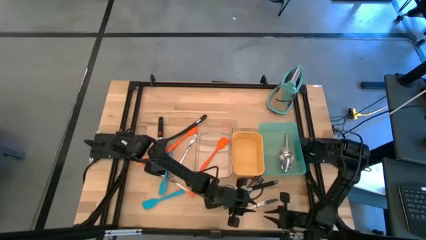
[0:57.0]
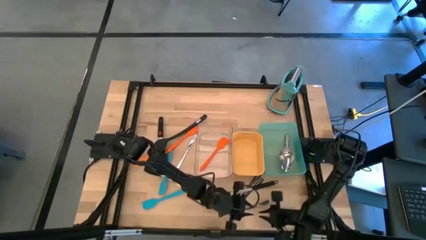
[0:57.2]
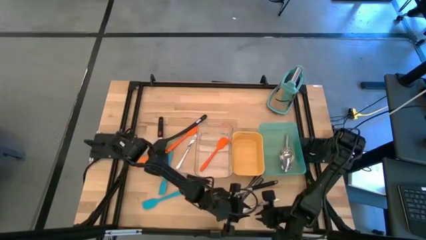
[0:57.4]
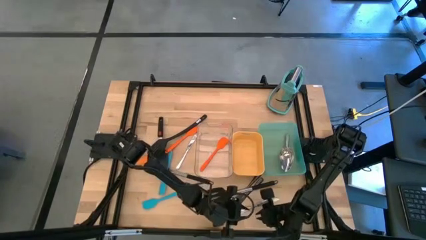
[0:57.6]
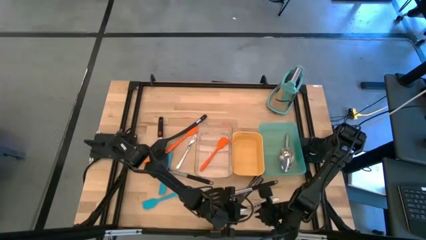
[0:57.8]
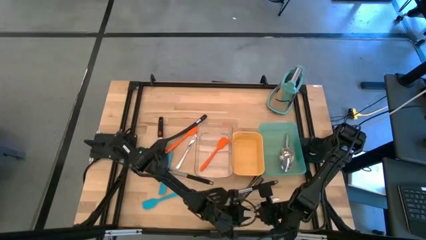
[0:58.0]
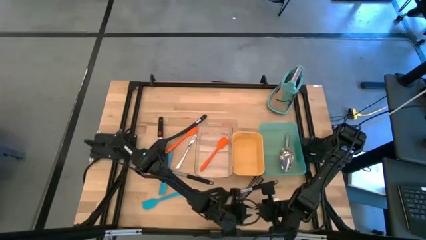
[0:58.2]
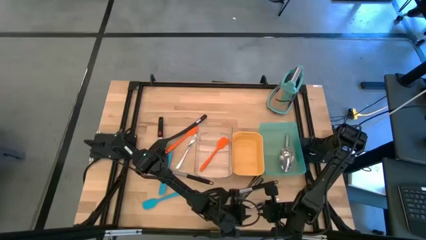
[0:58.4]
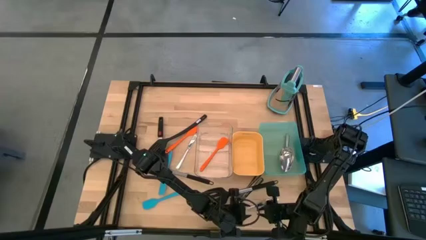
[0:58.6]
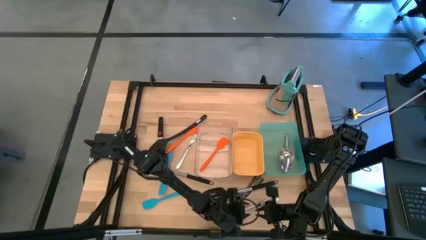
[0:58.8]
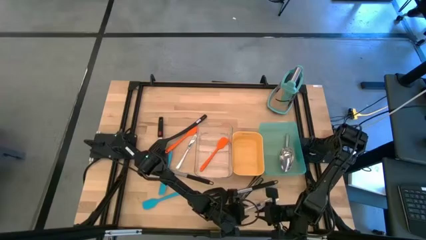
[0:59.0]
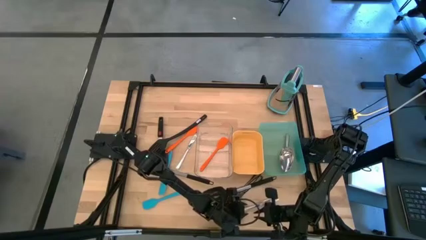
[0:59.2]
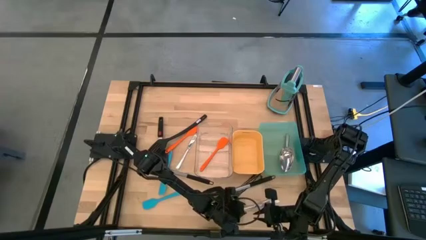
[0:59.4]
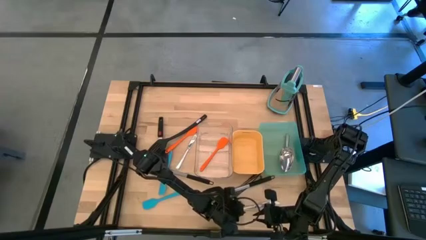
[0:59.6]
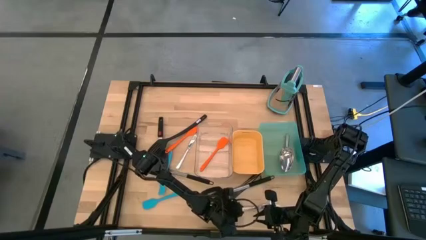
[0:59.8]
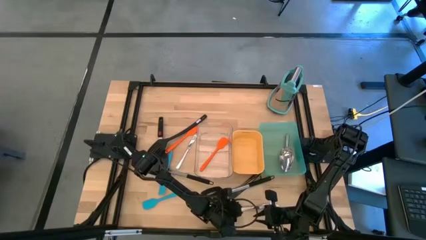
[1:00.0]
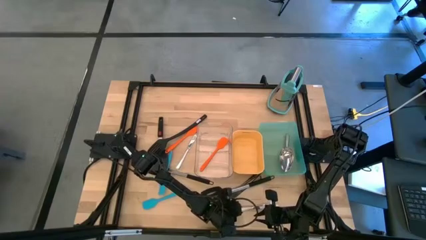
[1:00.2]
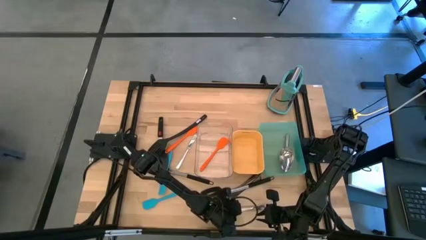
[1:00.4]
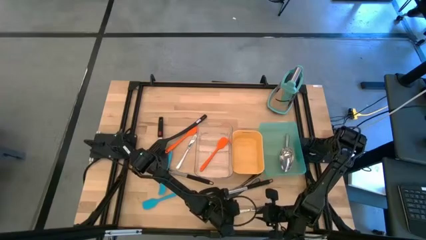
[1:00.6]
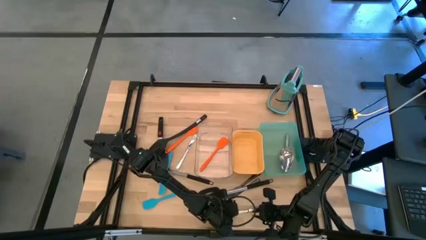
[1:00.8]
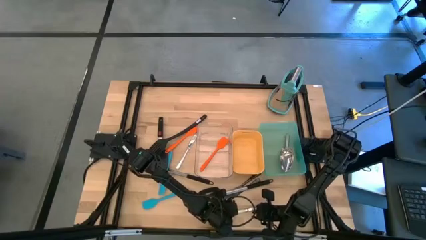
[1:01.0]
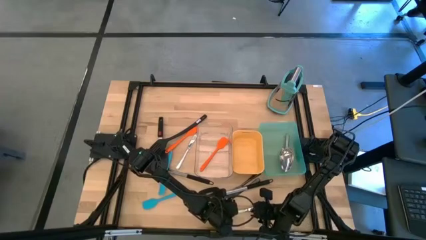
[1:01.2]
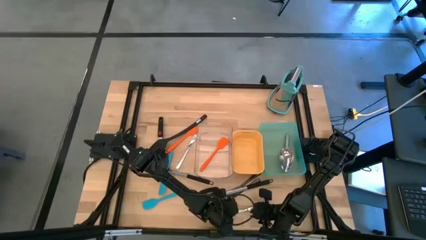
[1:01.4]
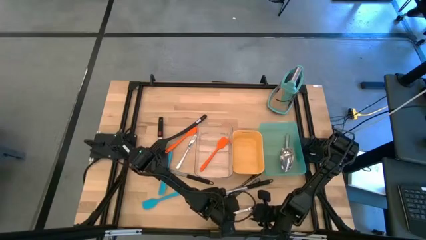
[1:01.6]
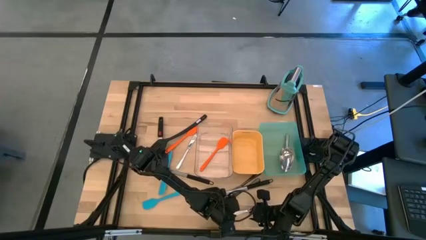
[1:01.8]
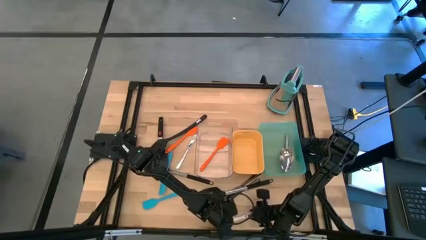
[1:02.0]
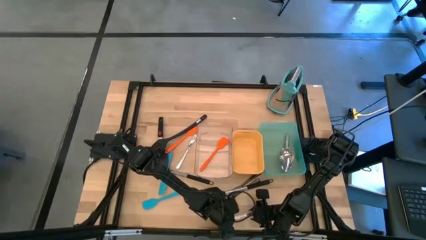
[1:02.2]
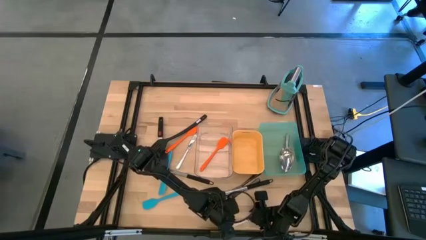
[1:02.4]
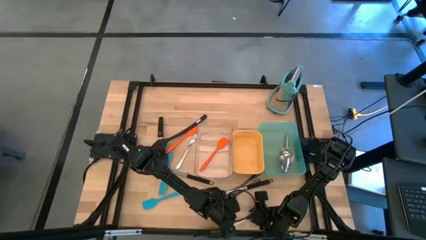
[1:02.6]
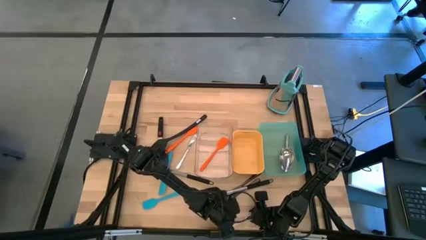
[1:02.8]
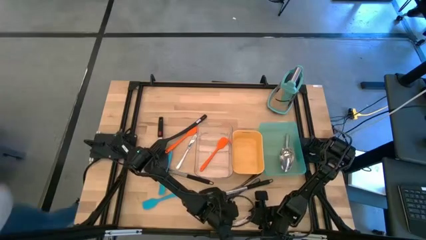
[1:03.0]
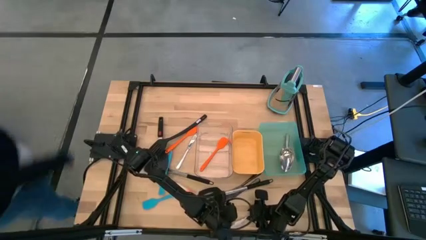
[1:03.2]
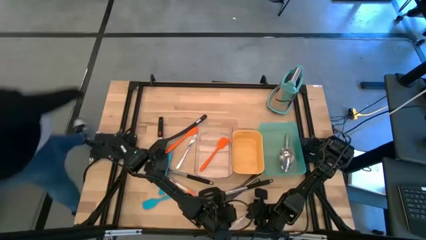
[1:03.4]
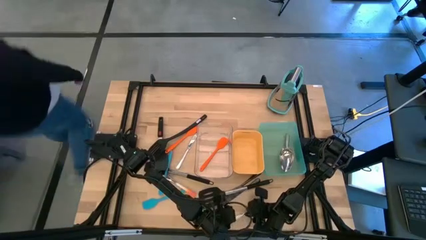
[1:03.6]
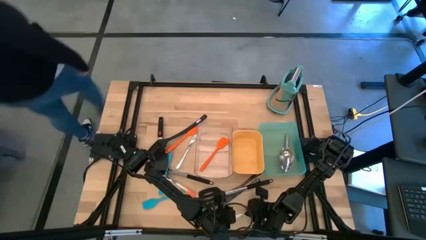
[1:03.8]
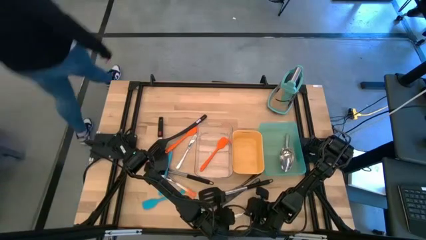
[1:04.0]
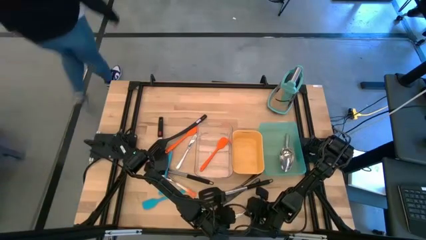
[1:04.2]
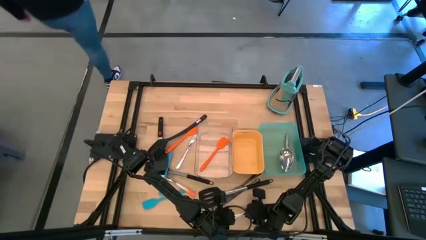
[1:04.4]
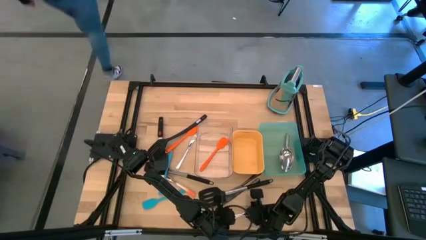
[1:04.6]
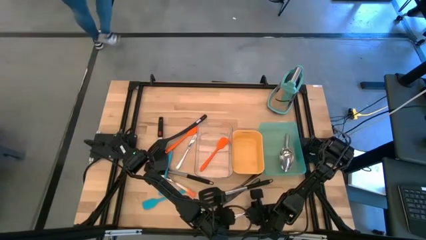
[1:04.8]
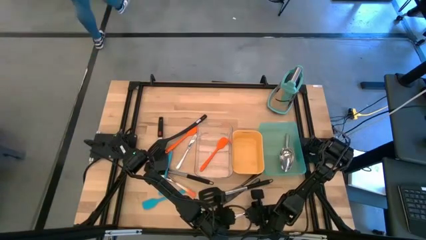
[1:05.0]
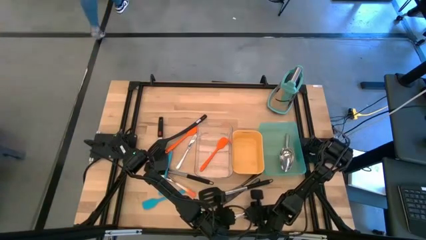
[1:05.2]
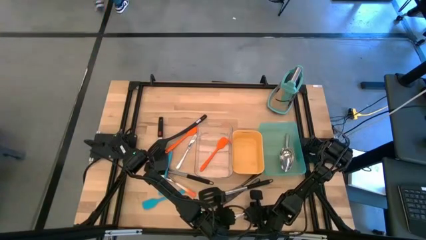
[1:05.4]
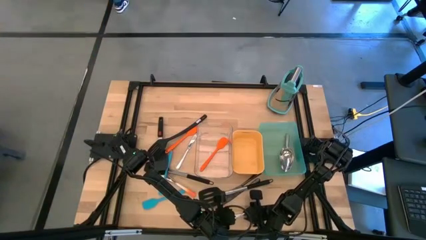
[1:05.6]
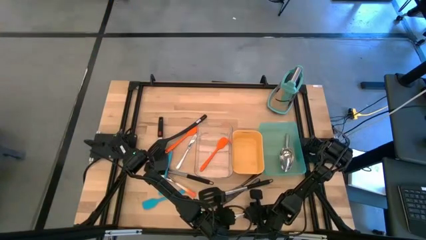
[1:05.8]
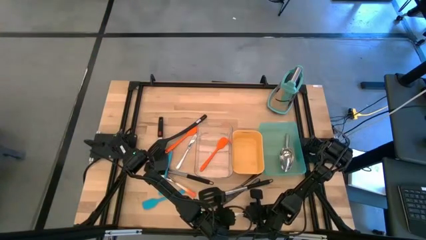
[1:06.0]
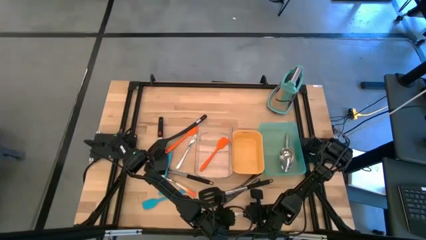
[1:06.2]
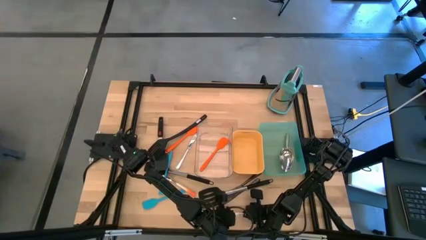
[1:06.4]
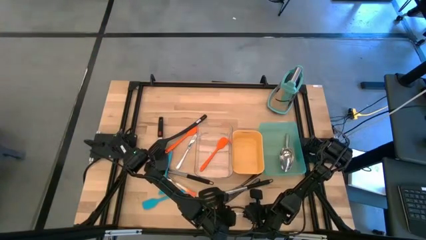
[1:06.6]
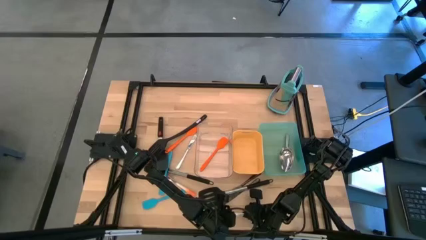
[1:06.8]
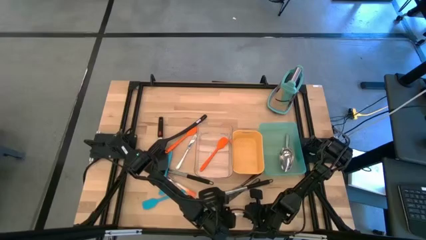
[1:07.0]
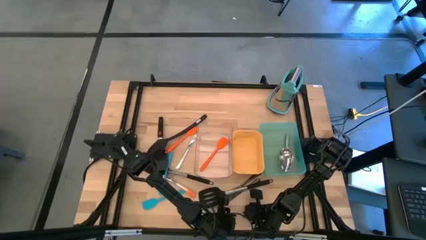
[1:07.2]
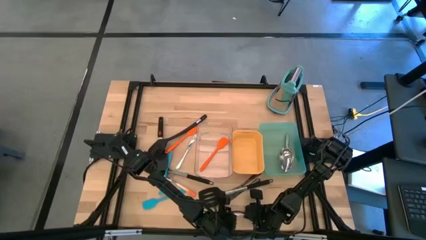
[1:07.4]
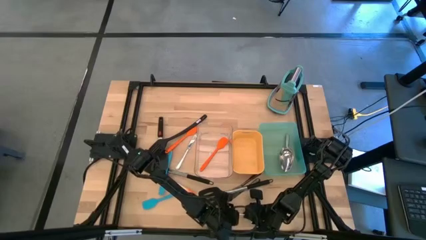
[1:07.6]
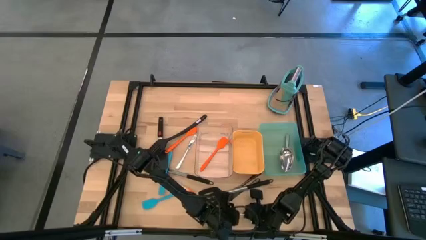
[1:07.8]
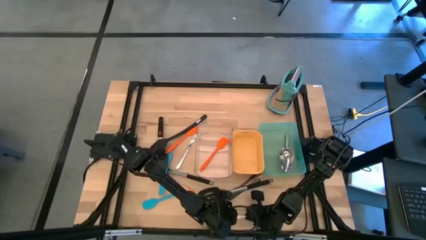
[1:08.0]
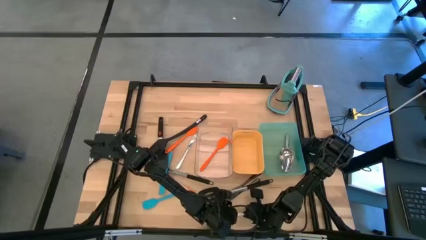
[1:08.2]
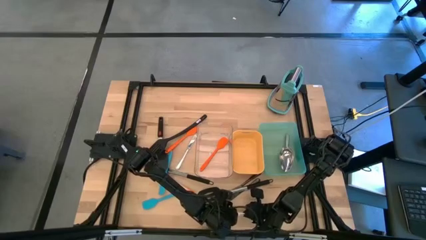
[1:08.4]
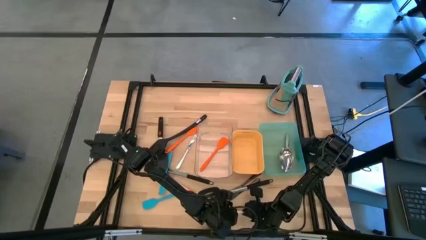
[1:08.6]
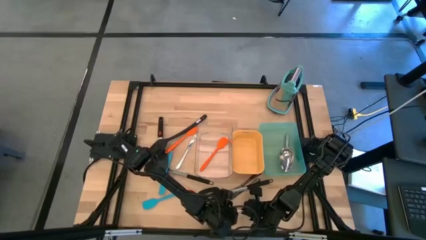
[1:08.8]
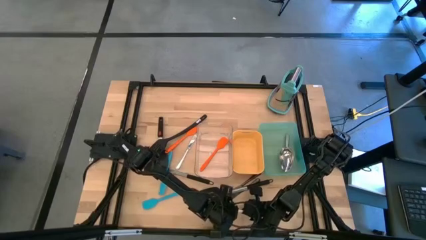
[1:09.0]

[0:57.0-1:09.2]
Task: Pick & Place Kitchen Items
Put the silver table knife into the yellow bin
